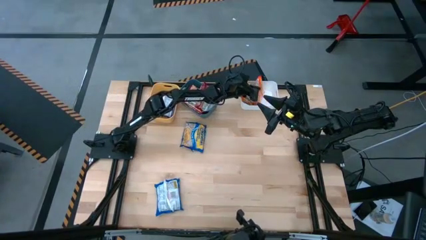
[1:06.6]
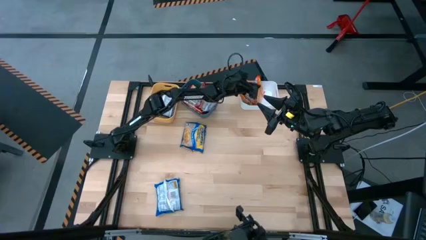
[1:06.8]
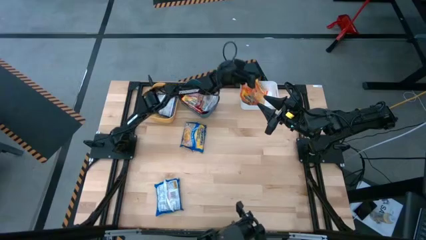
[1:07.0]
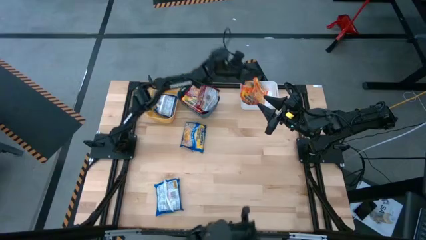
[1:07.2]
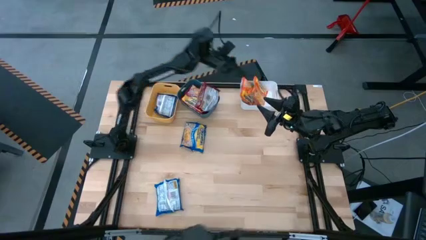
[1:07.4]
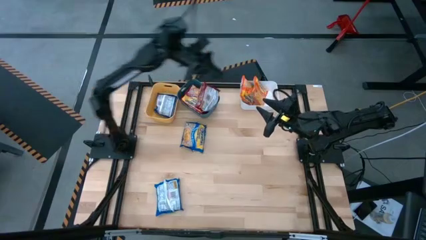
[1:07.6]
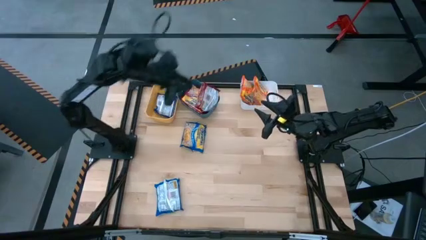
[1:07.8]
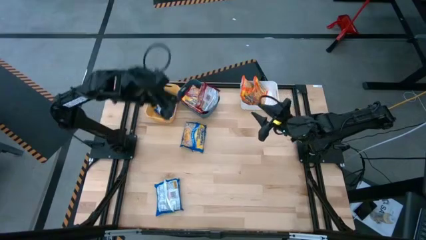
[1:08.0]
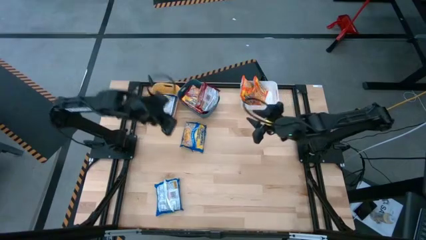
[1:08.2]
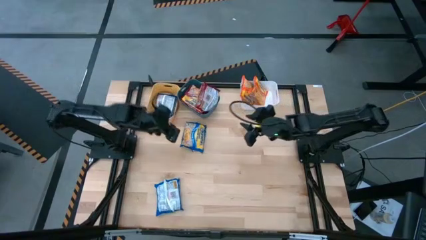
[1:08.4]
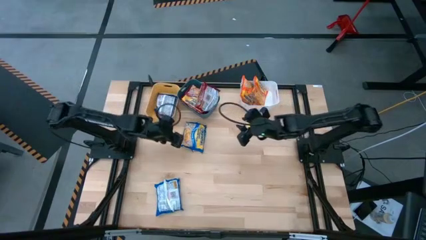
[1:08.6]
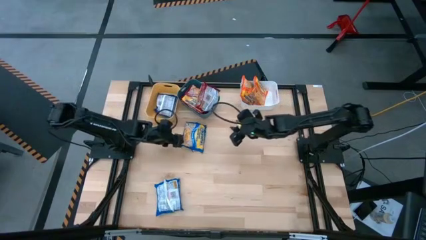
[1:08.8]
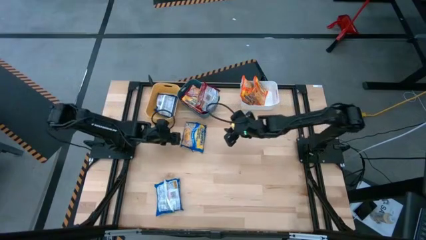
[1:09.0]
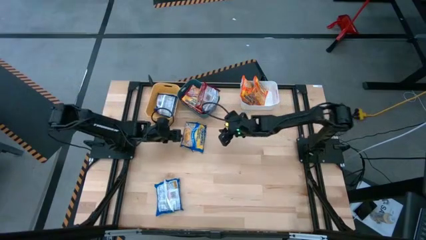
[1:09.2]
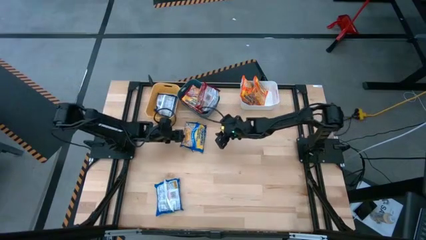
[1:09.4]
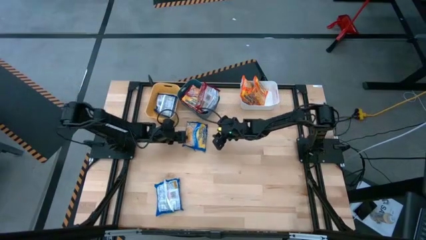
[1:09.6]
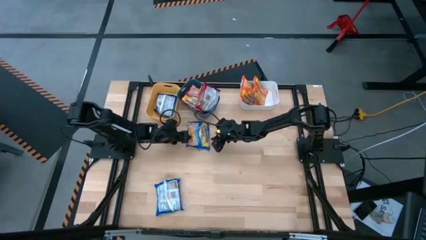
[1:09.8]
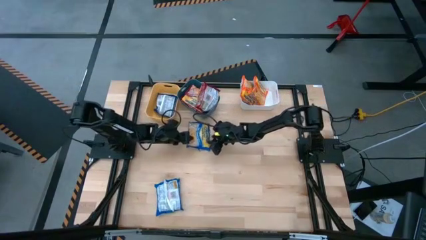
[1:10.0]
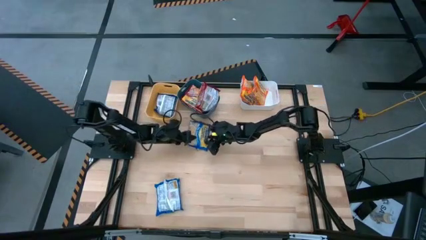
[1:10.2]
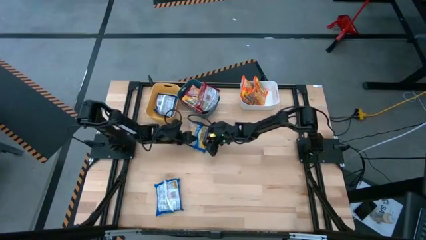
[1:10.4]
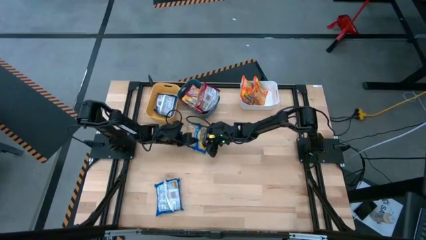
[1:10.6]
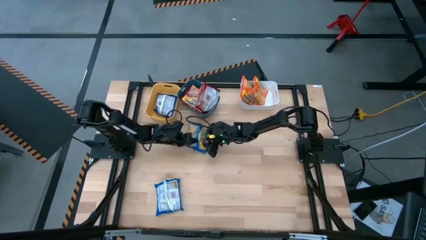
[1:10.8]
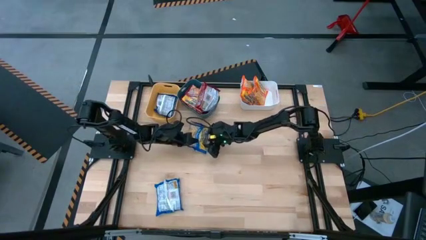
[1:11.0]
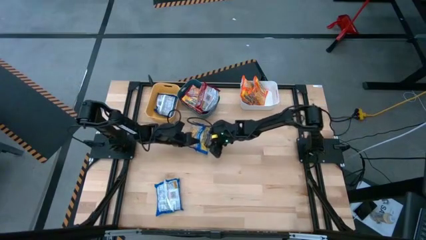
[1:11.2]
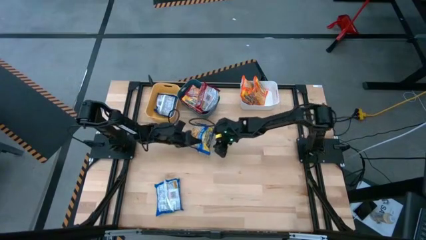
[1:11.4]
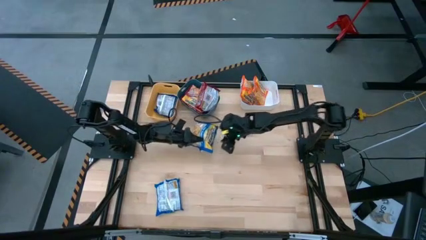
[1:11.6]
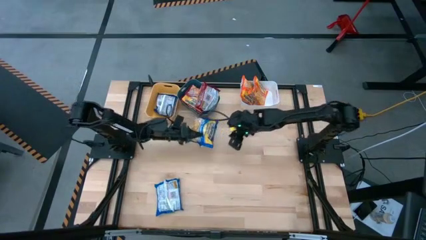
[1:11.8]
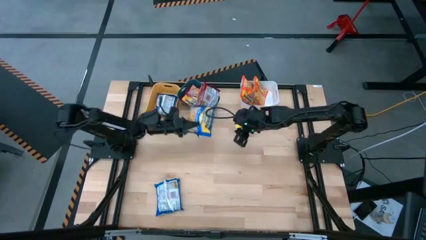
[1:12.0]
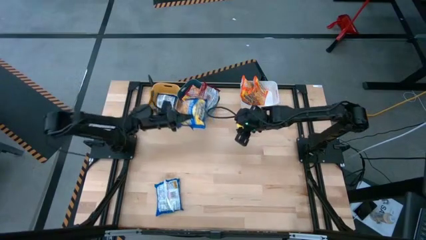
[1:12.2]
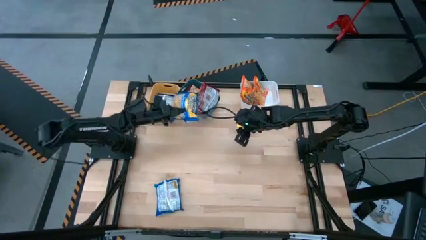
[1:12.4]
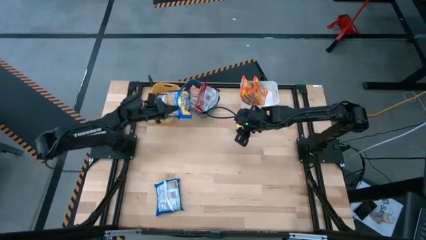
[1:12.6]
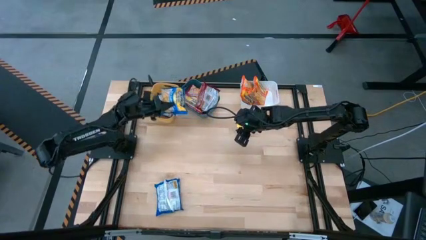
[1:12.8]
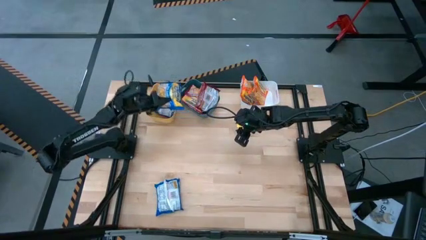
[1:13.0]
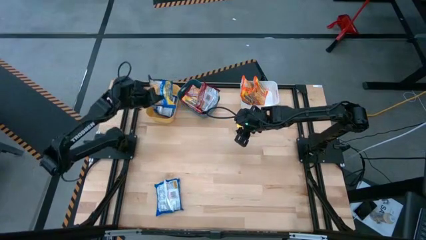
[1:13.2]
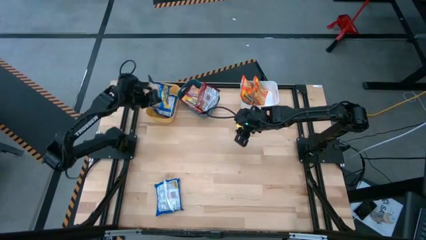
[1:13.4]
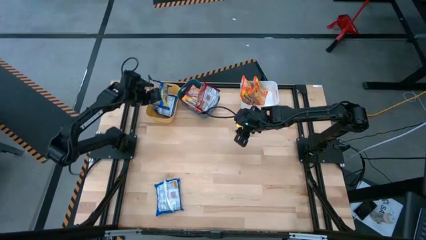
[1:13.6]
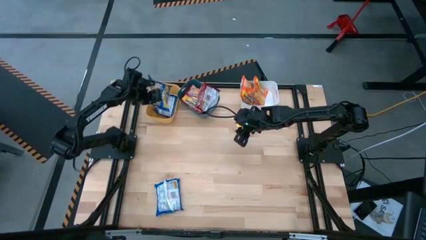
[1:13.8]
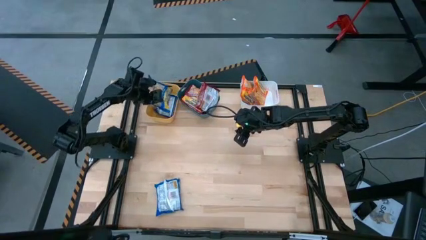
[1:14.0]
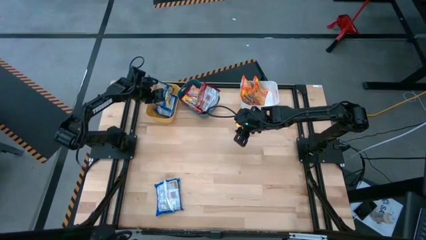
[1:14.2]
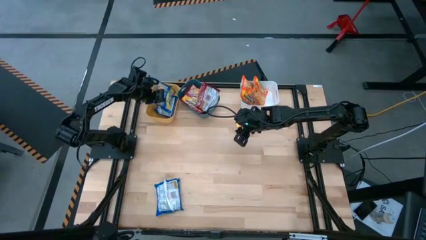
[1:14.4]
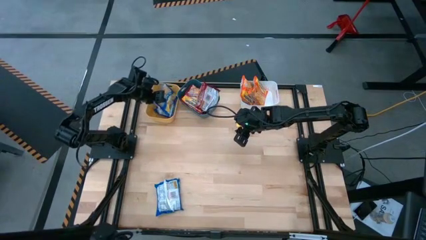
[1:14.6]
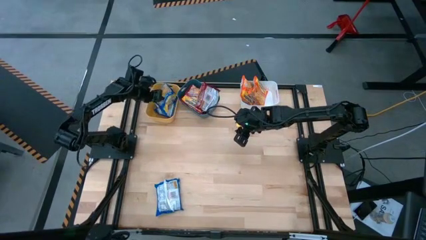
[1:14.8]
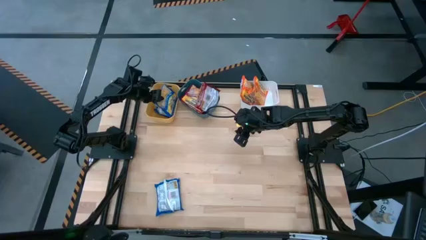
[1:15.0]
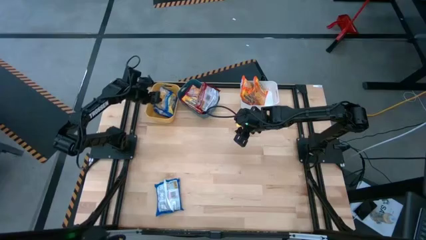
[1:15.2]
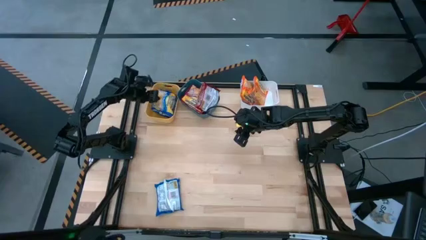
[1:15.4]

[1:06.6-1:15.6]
Task: Sort Maruchan noodles
Put the top blue bag into the yellow bin

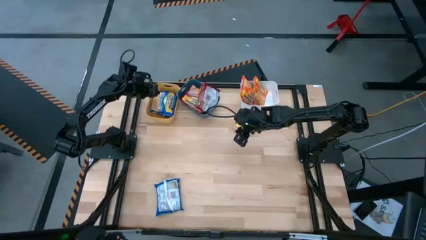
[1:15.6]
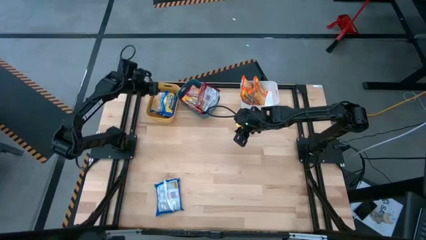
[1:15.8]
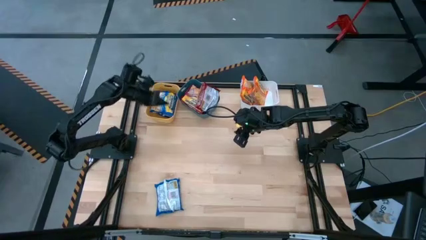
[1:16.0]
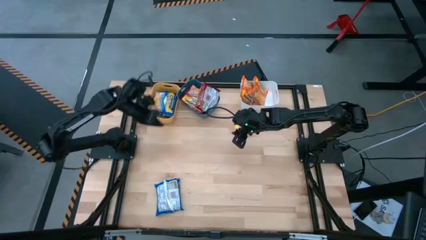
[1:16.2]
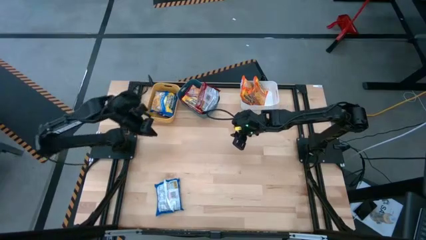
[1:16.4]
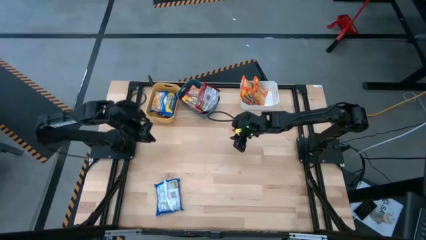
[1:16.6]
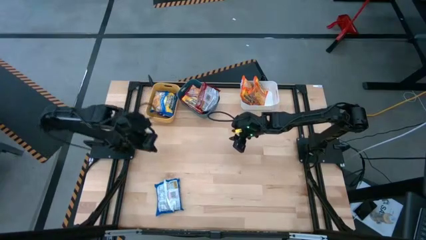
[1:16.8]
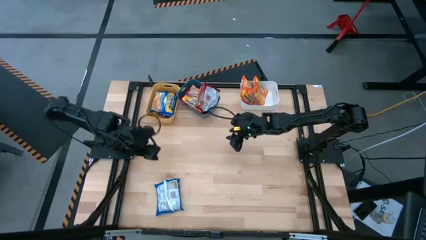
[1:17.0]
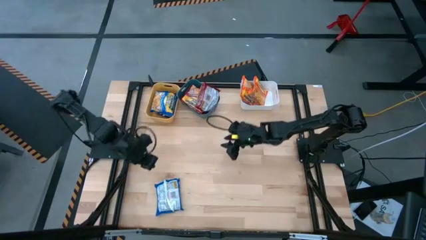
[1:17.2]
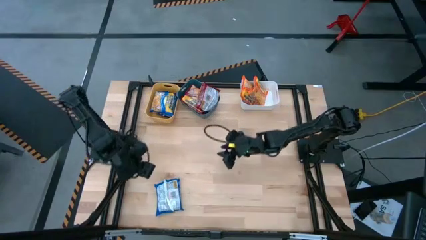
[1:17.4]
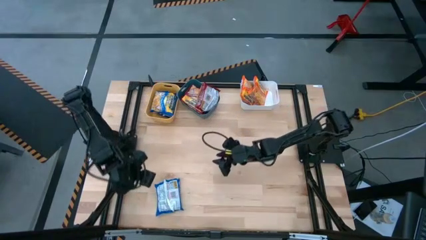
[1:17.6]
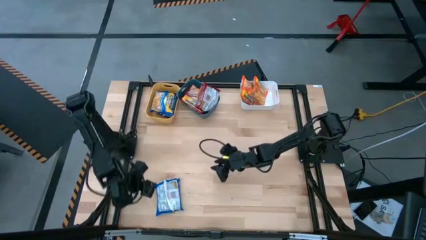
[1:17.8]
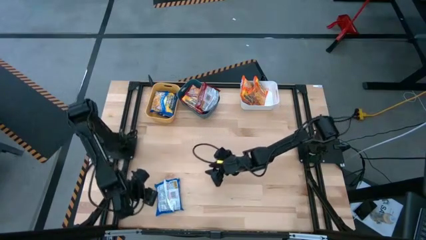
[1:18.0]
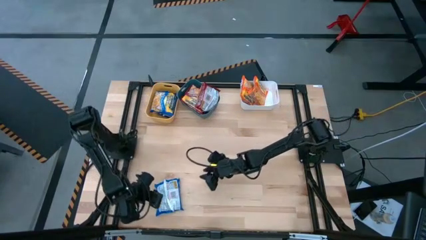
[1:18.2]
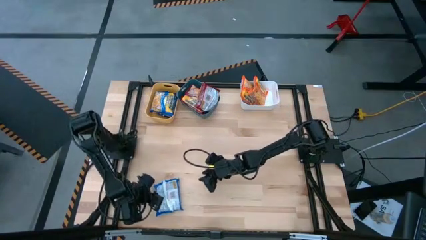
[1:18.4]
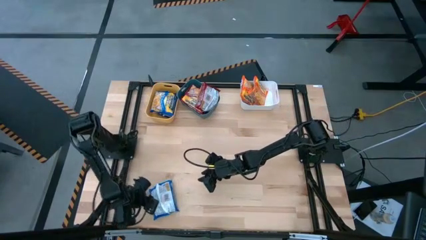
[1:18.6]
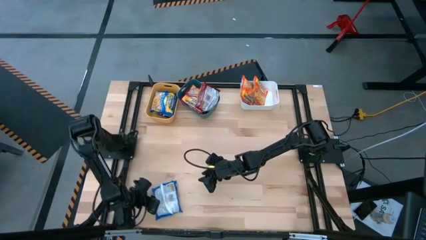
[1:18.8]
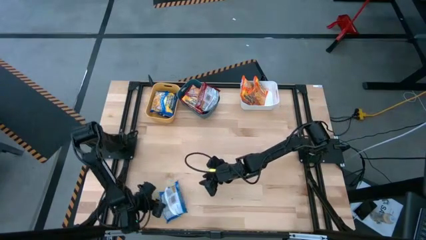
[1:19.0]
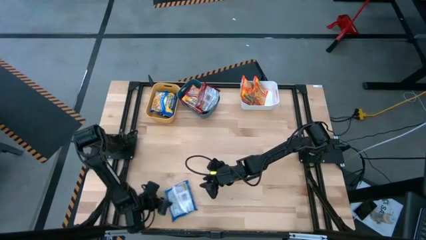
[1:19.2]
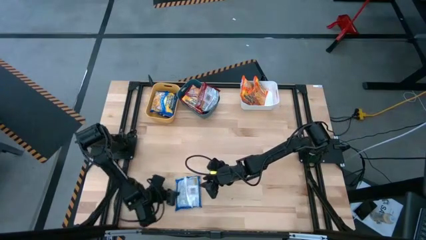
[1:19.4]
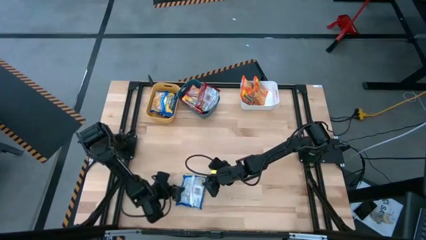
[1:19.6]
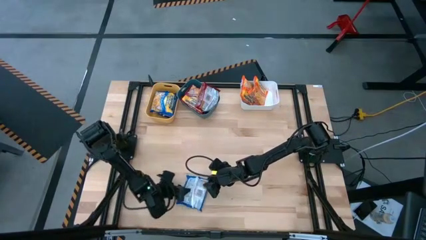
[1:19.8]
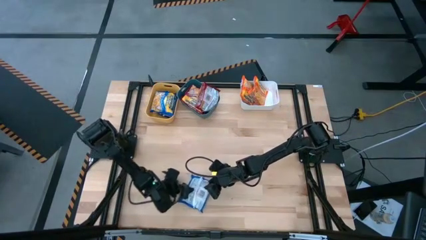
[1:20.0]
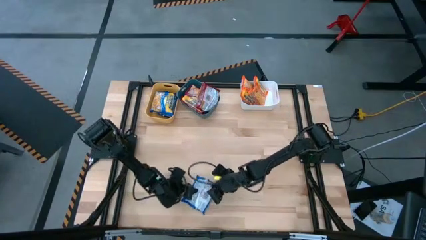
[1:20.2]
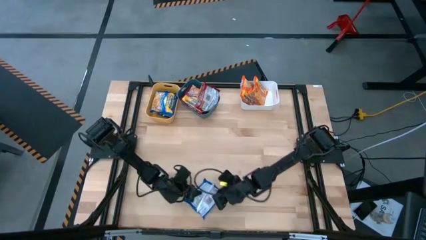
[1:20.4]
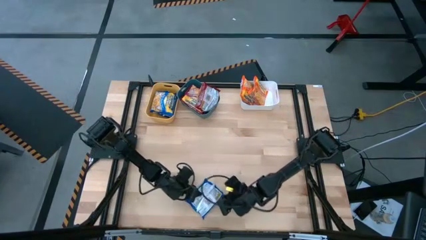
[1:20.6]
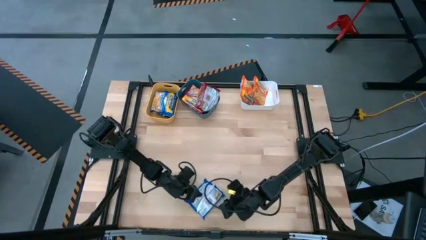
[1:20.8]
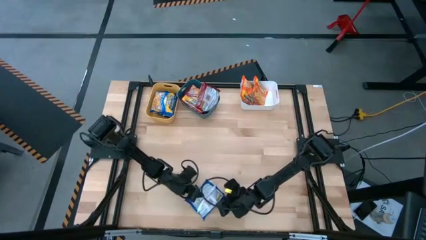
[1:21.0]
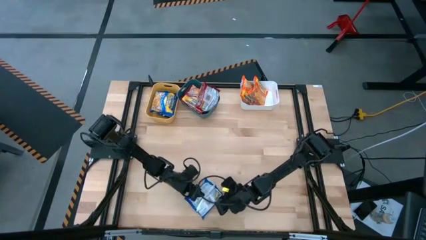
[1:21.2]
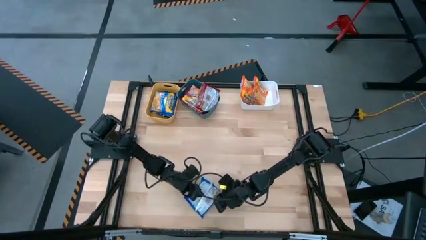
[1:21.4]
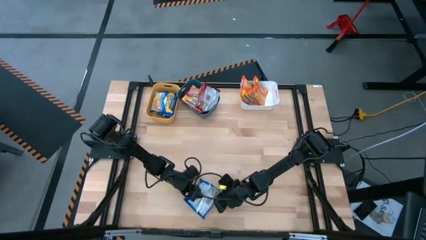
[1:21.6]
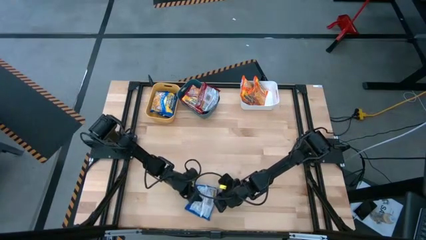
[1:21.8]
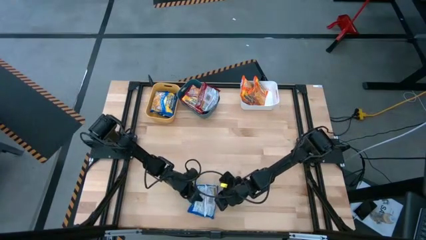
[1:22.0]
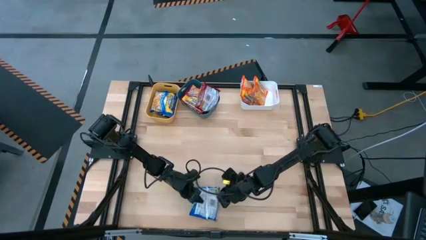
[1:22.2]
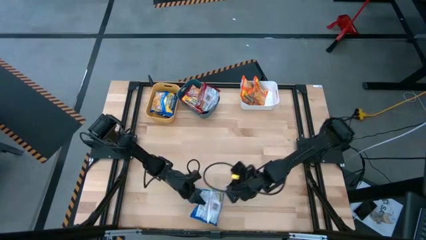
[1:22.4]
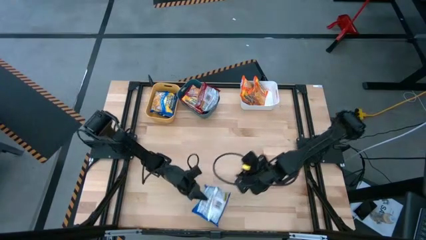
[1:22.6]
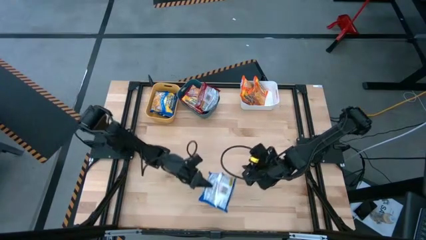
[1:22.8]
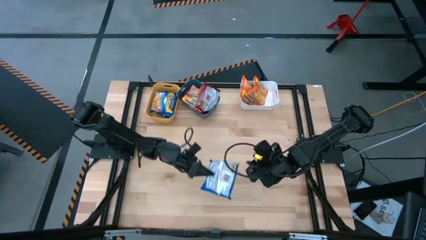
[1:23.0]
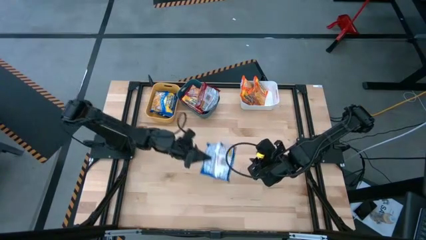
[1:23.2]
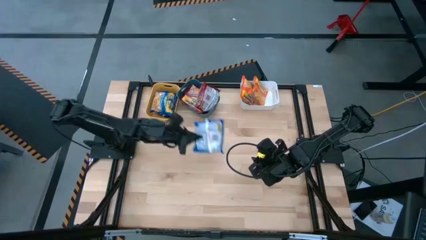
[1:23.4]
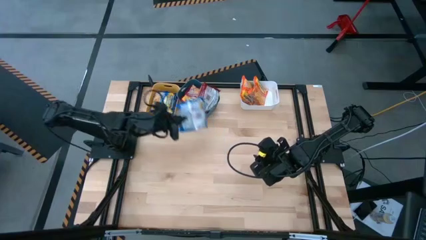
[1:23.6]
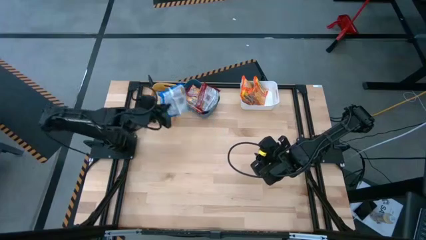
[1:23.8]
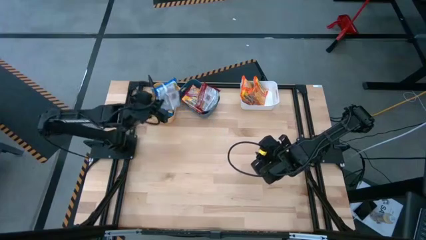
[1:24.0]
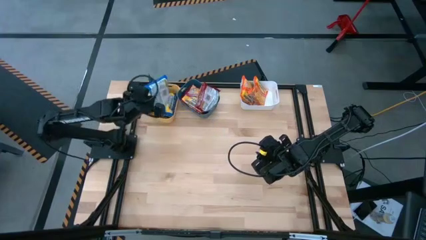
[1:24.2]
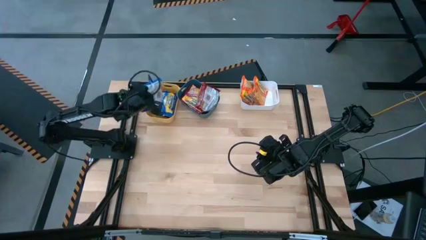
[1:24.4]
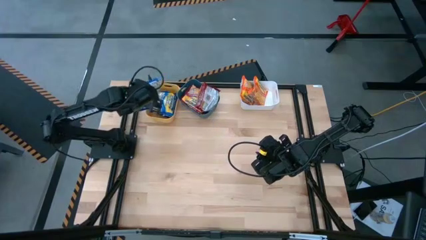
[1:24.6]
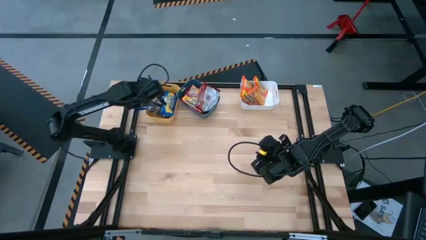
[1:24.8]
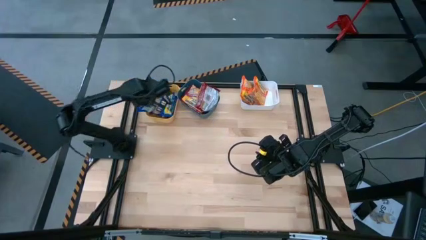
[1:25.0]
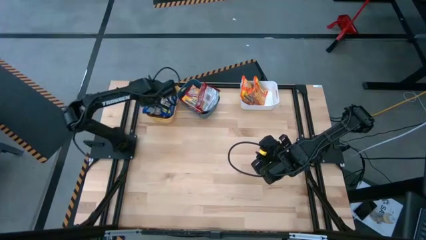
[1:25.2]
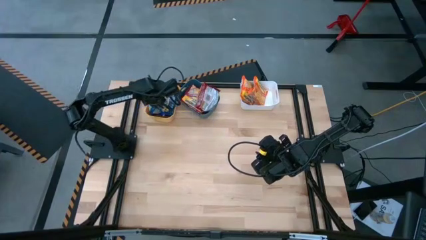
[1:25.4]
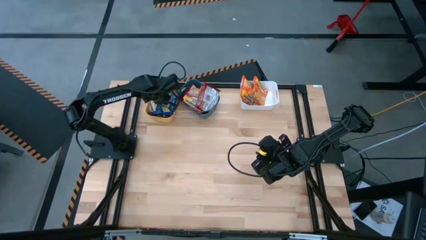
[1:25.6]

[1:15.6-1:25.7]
Put the blue bag into the yellow bin
